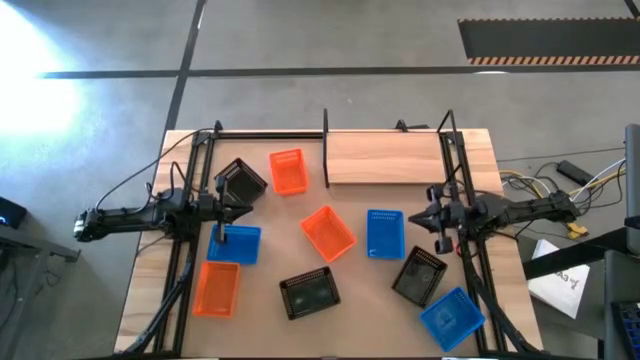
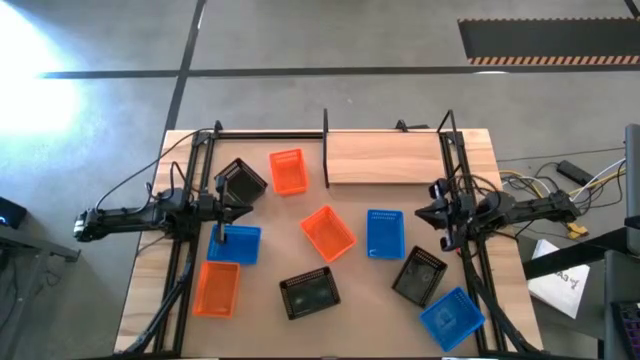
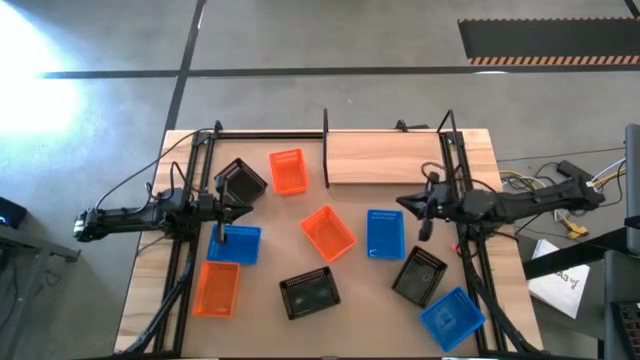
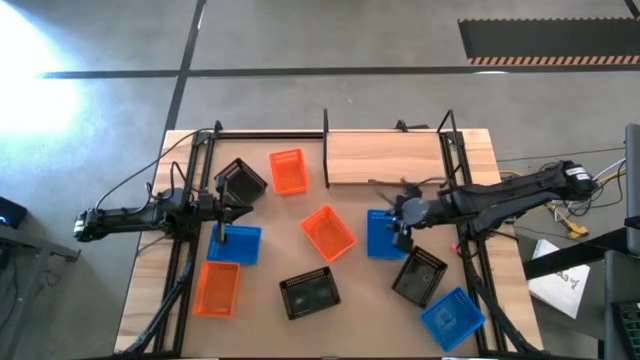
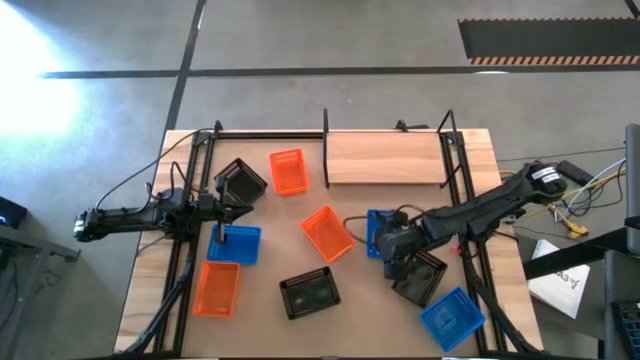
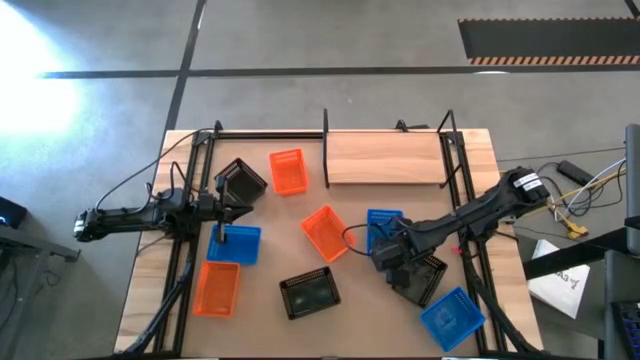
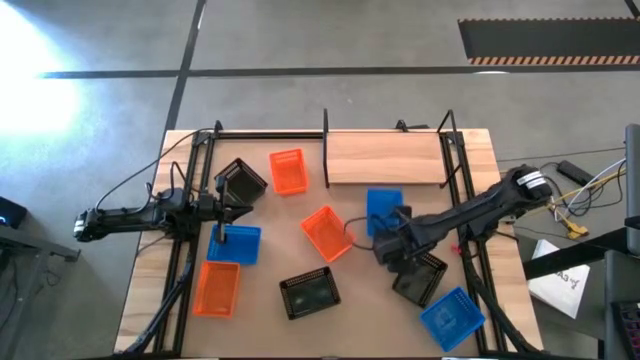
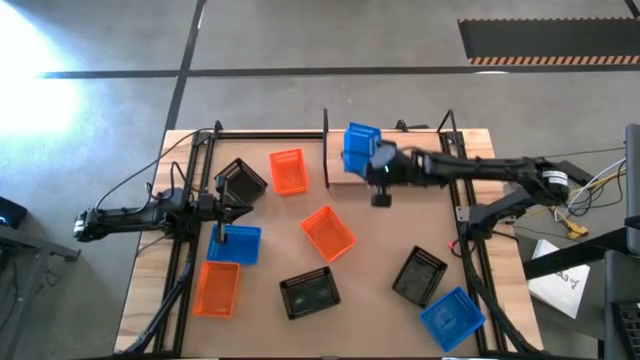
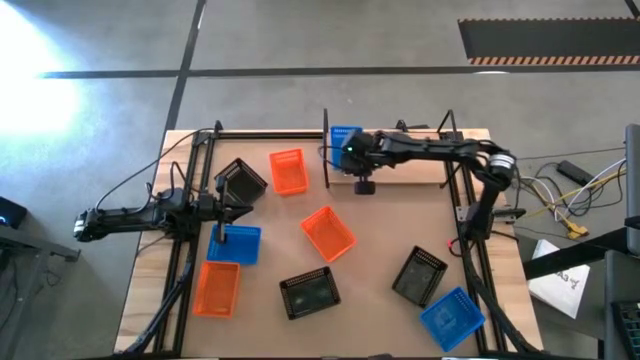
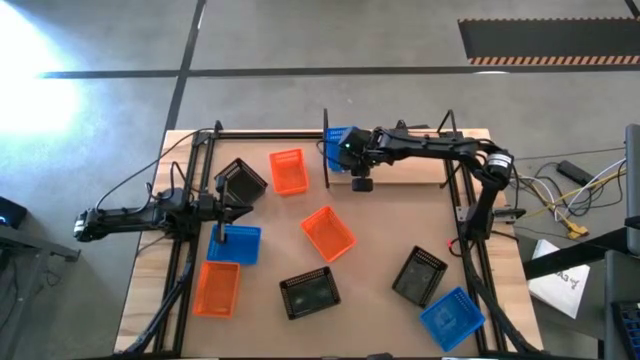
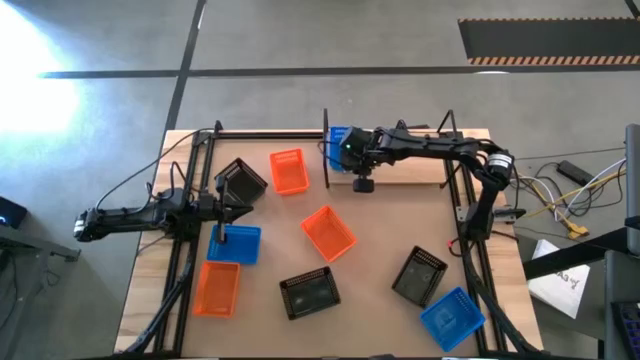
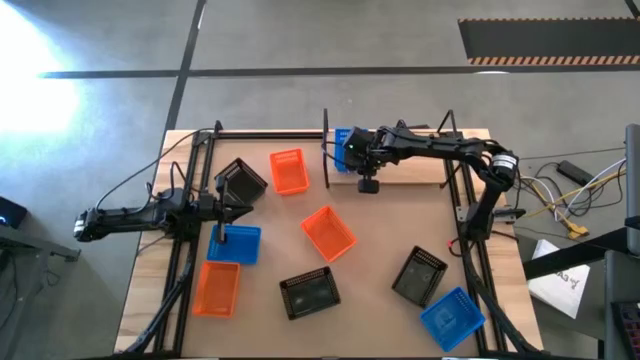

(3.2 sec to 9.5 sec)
Task: Stack baskets on shelf by color
Put the top right blue basket on the shelf

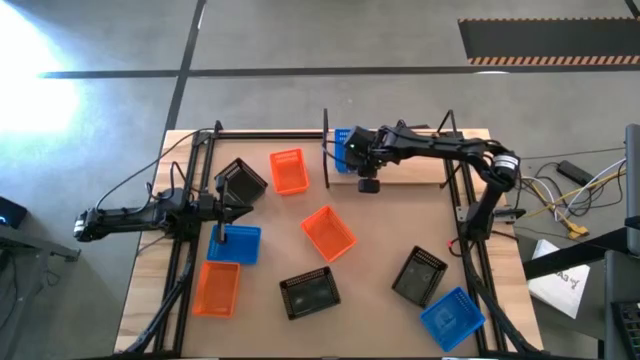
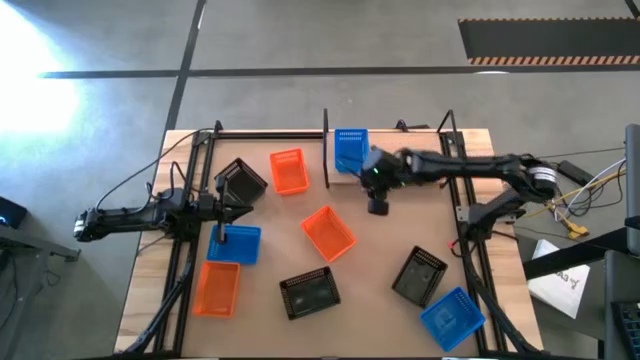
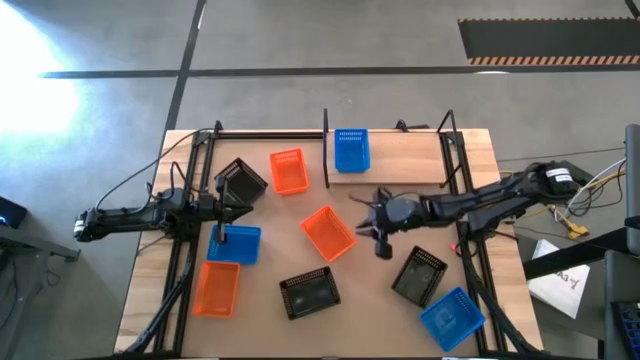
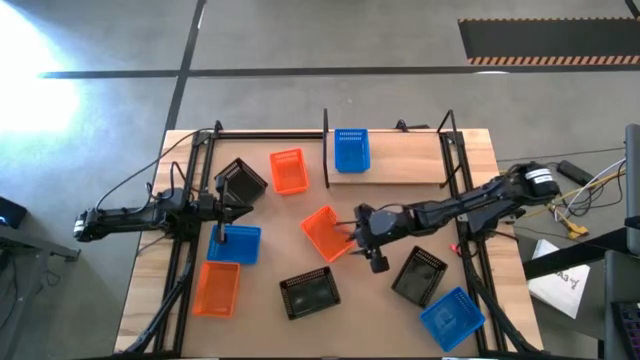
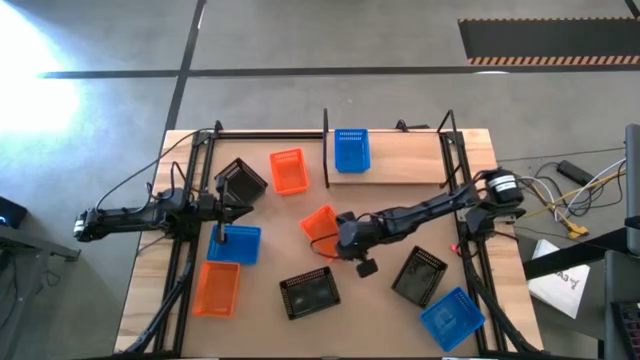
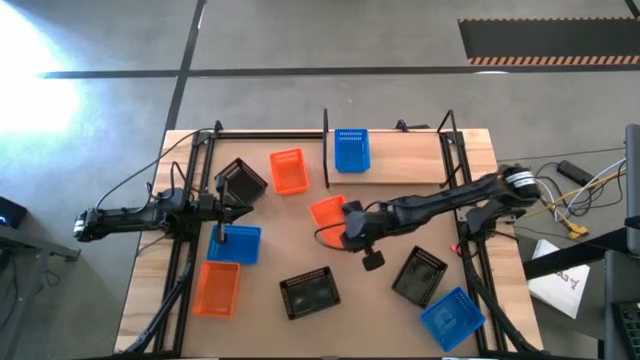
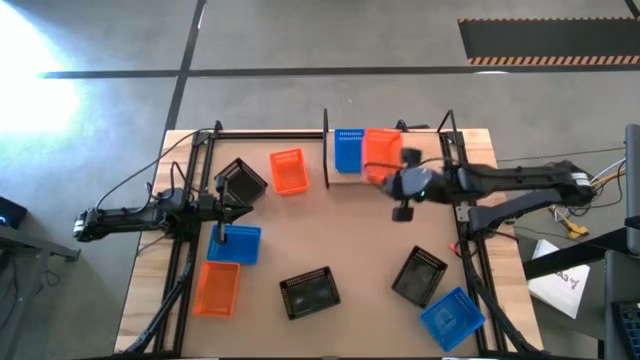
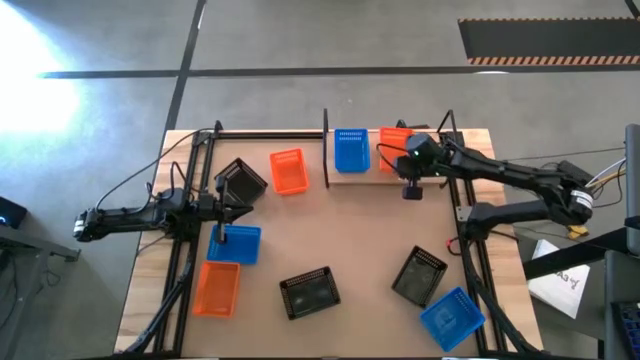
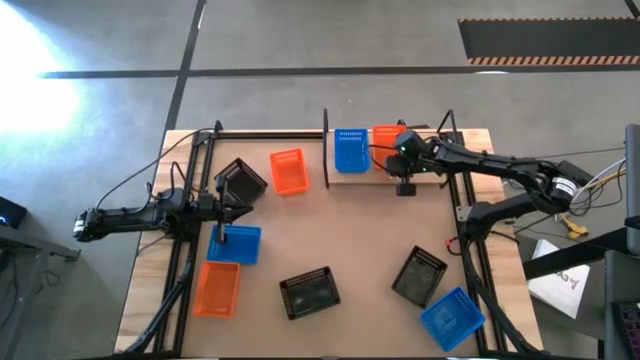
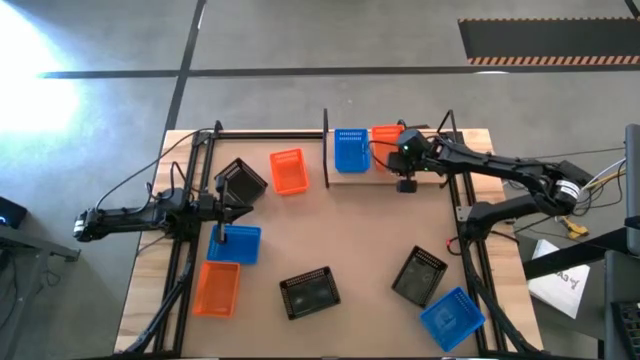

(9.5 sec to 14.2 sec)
Put the middle right orange basket on the shelf

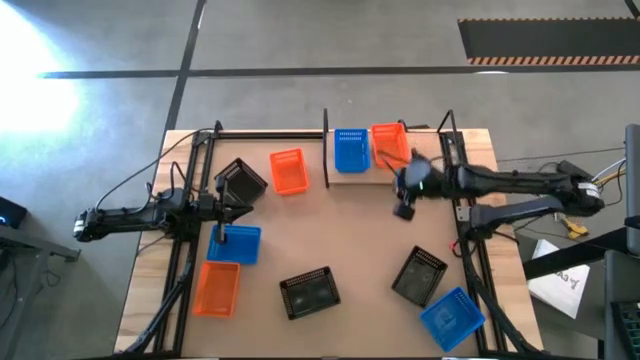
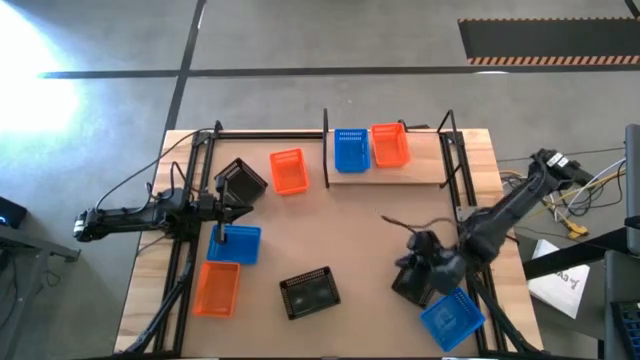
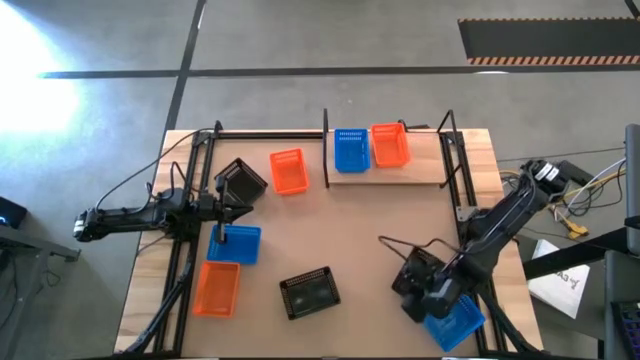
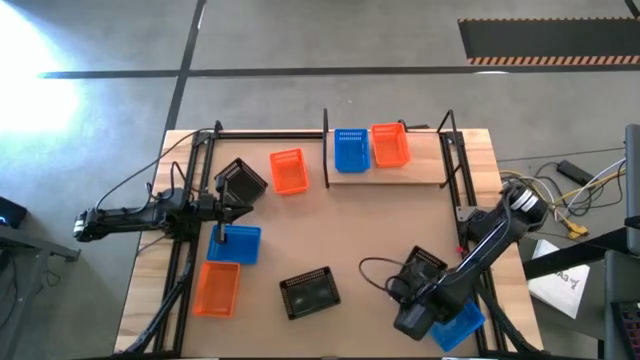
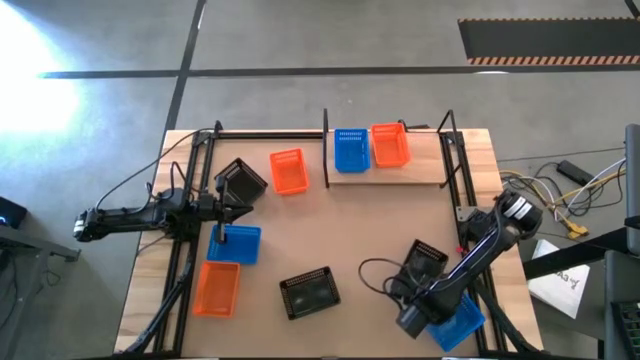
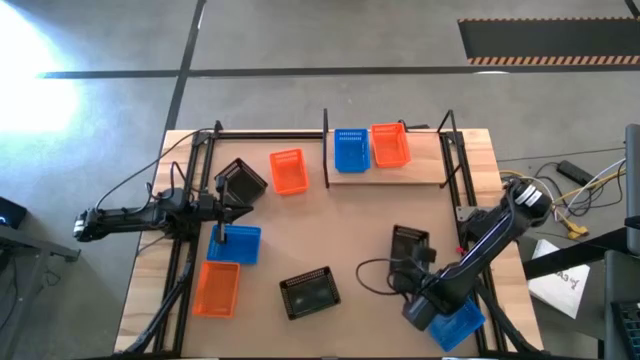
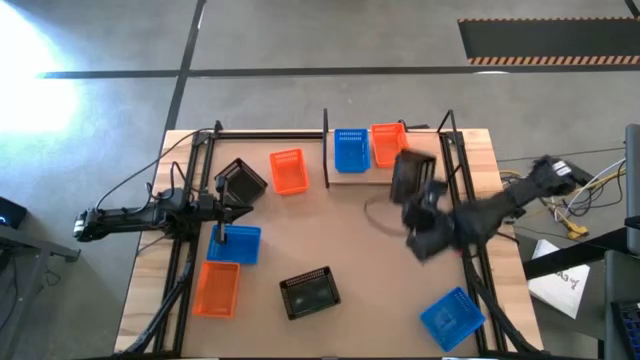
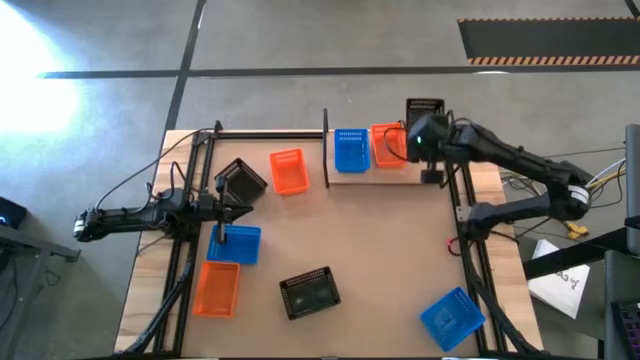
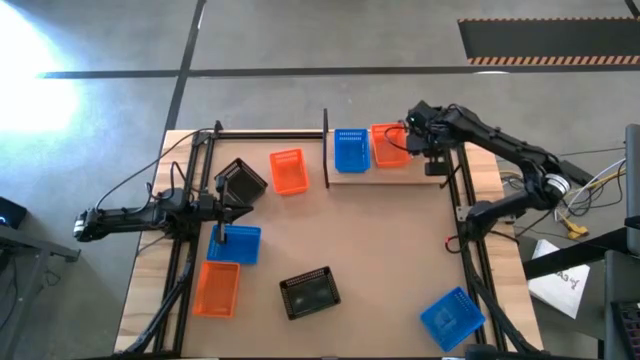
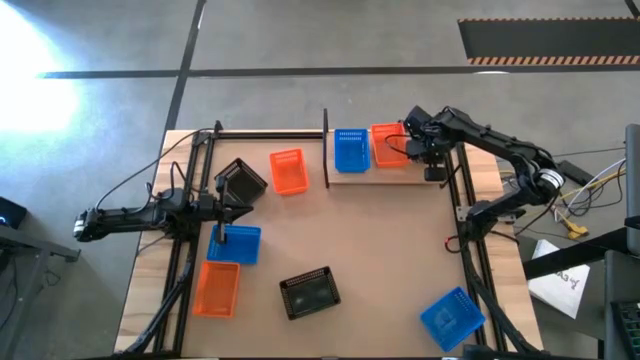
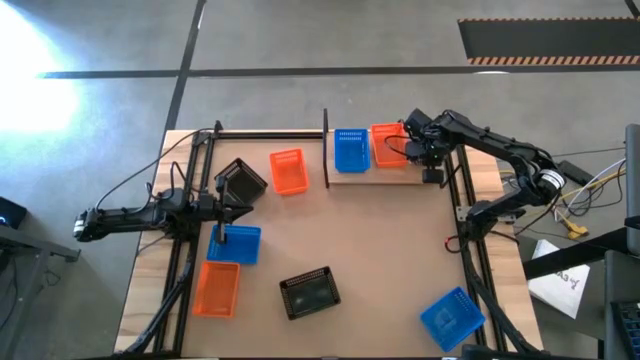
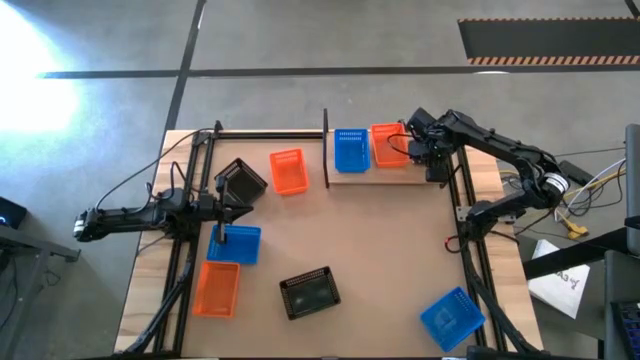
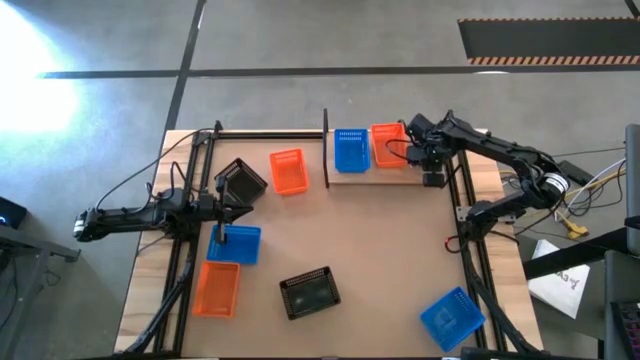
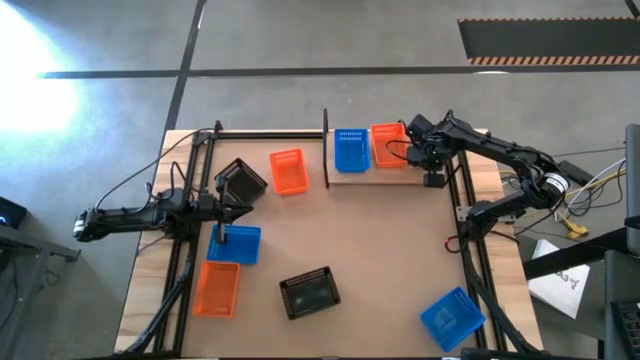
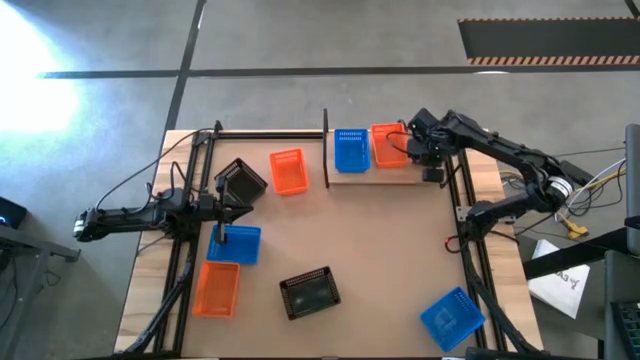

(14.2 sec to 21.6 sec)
Put the bottom right black basket on the shelf

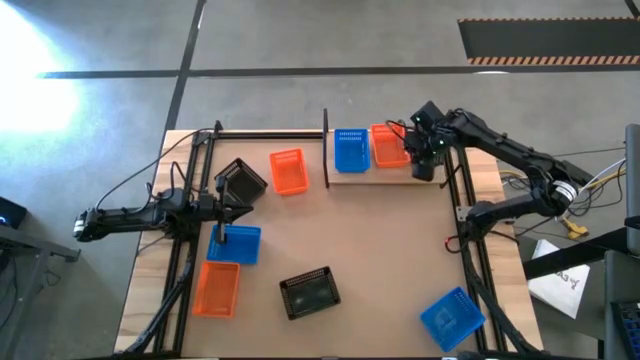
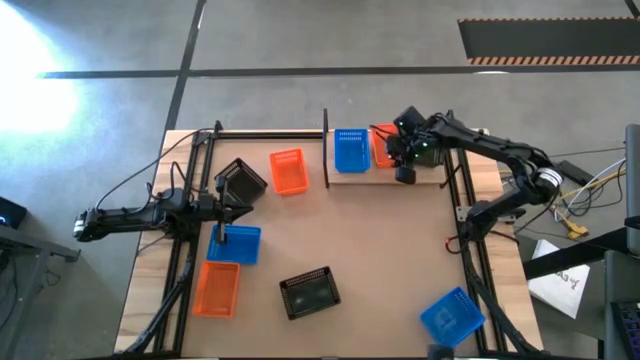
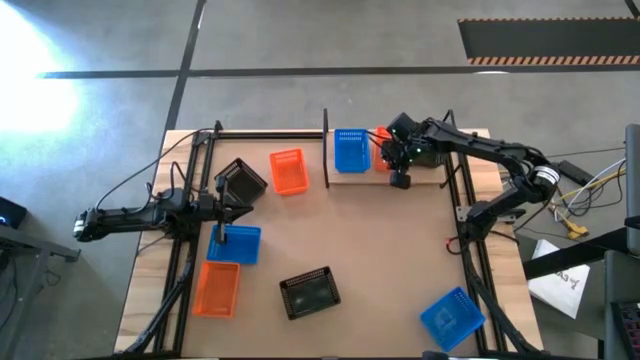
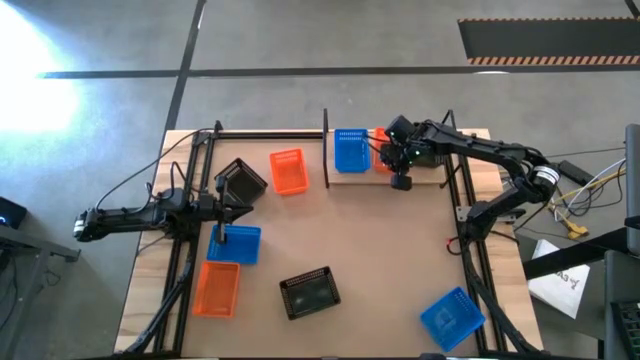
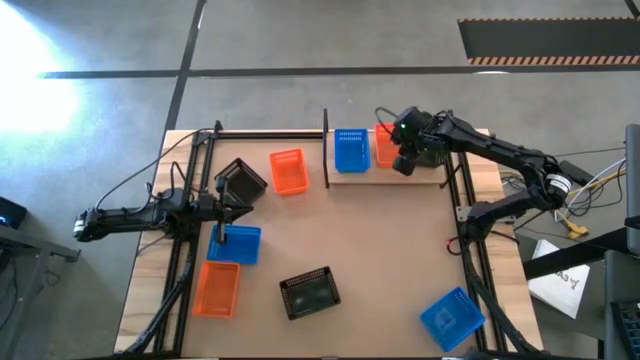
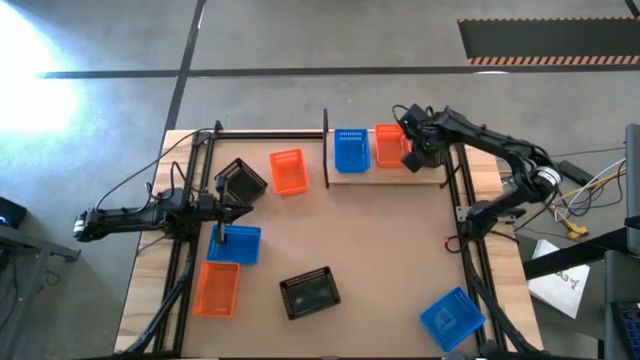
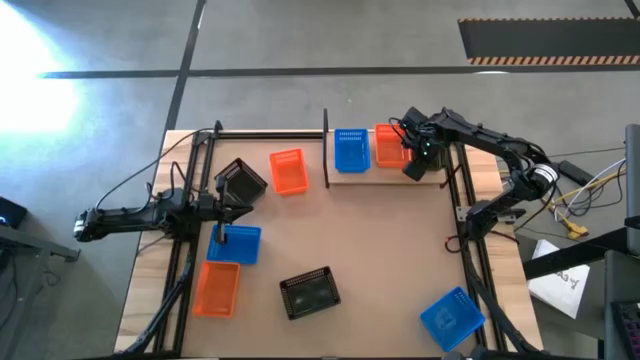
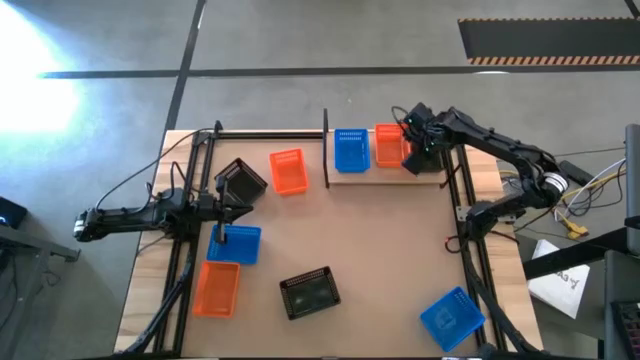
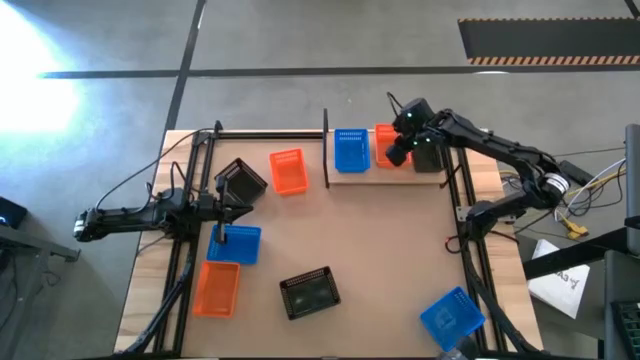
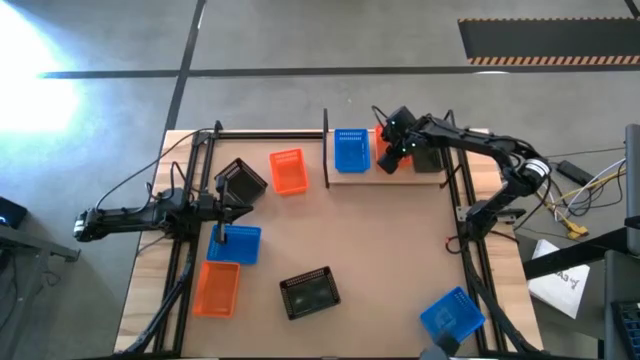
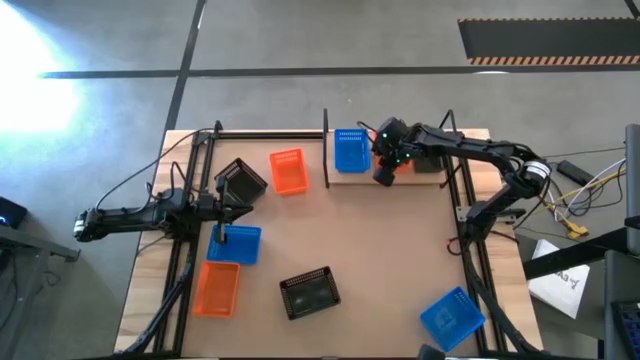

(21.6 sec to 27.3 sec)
Adjust the baskets on the shelf
